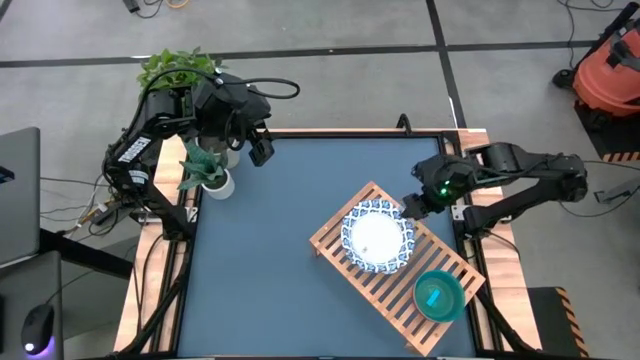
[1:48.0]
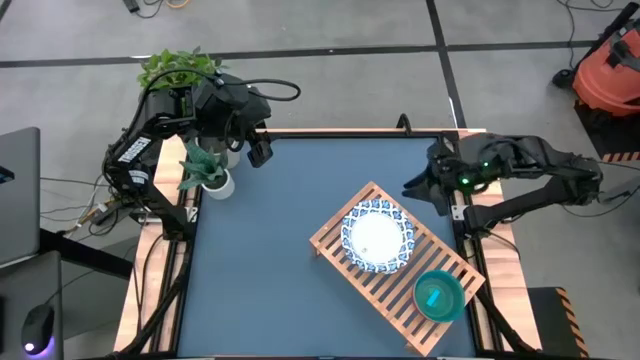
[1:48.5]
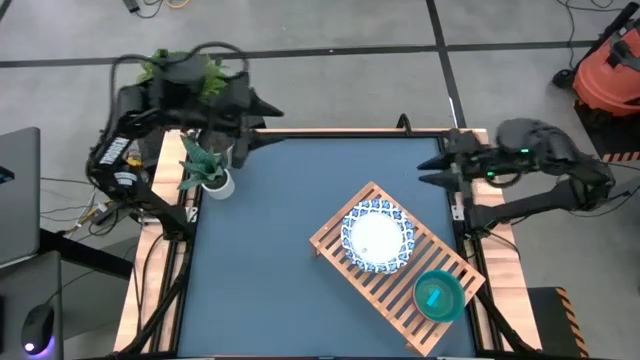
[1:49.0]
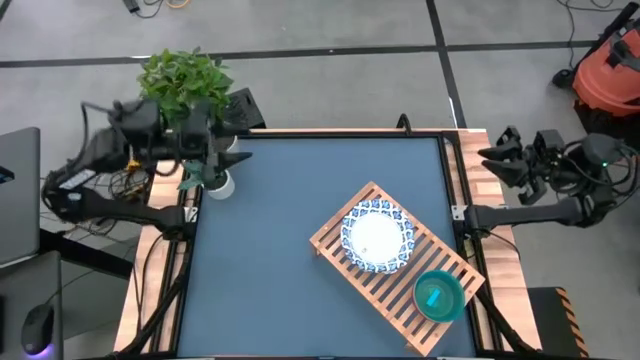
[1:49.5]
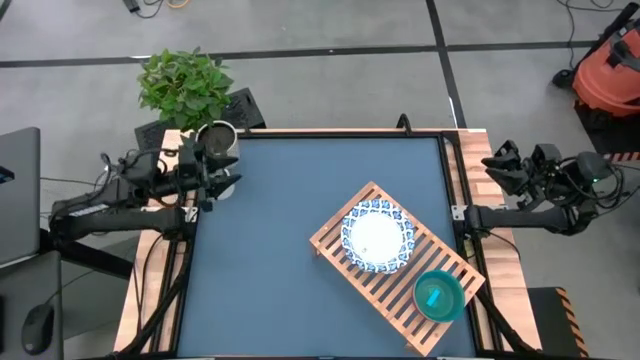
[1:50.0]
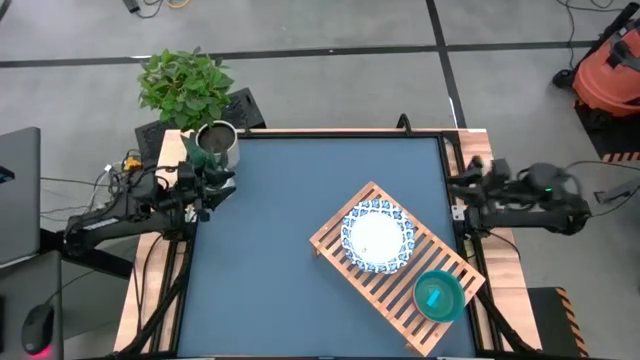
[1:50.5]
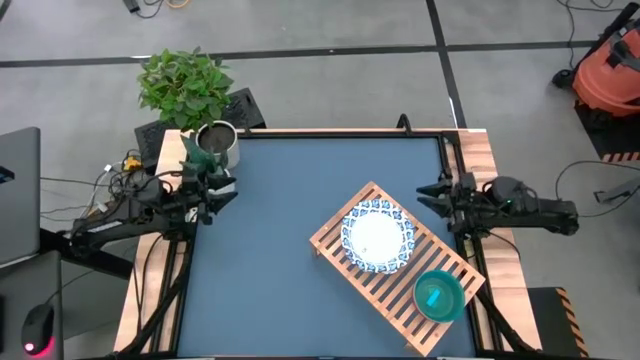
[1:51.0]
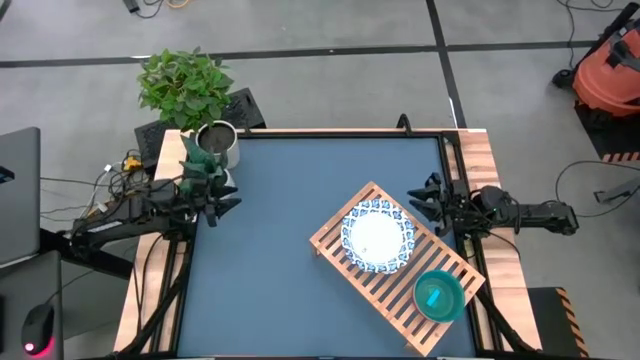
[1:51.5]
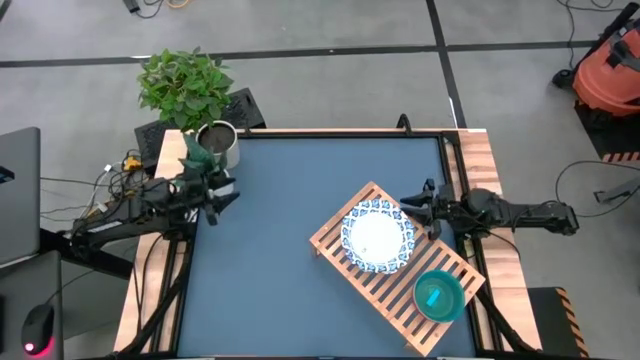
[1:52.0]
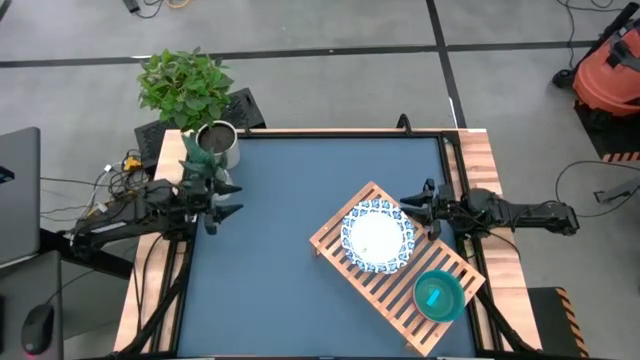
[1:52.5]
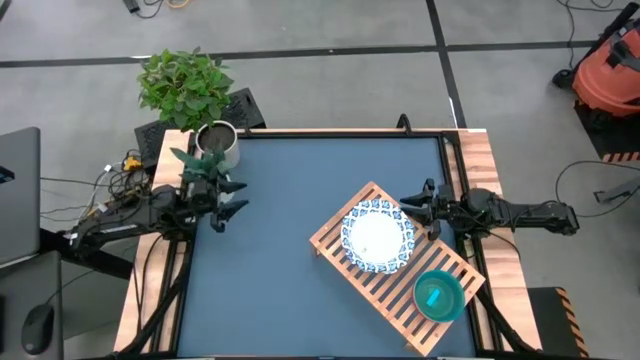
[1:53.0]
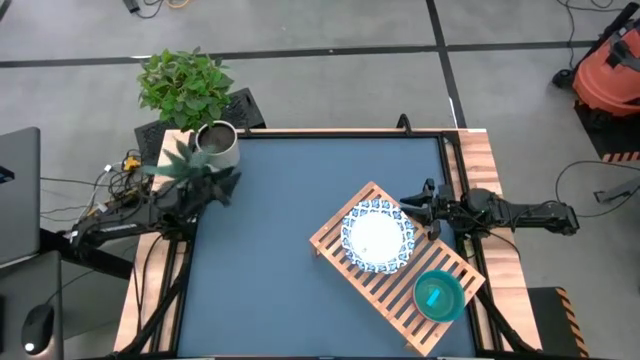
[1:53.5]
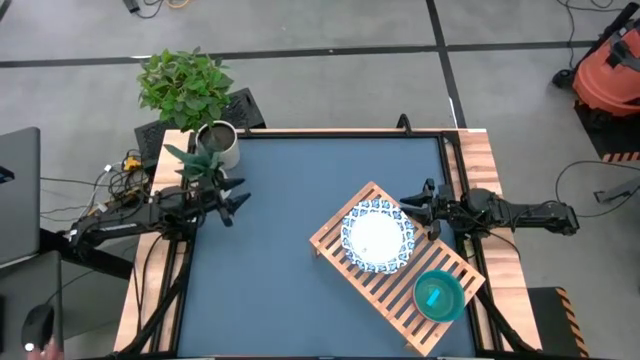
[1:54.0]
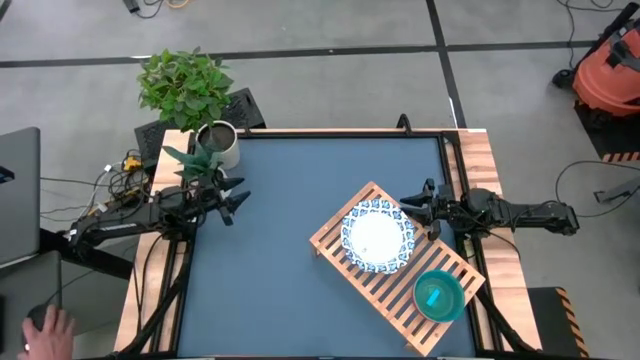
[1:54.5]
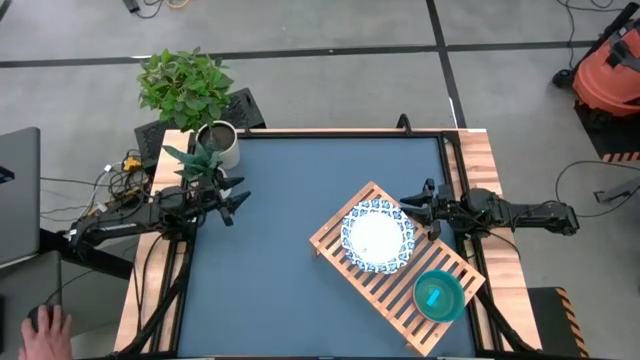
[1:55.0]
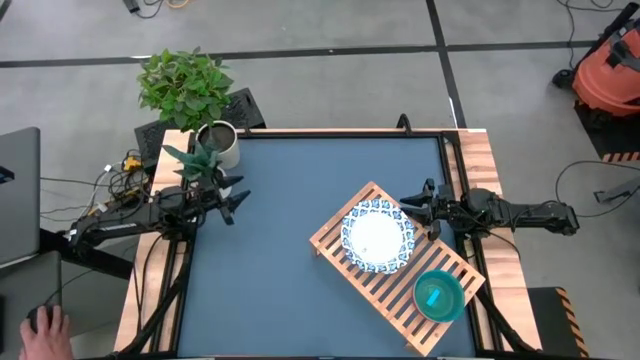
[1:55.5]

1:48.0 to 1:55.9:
Task: Place and stack bowls onto a shelf
Return to Home Position

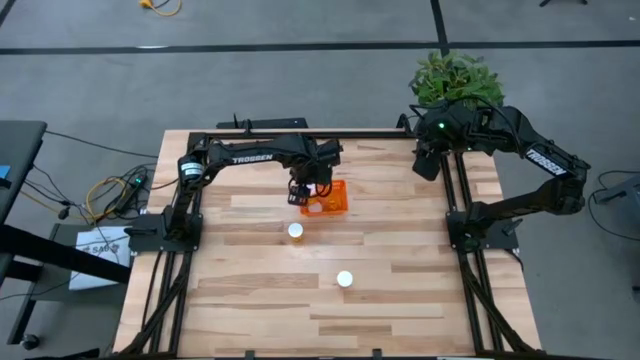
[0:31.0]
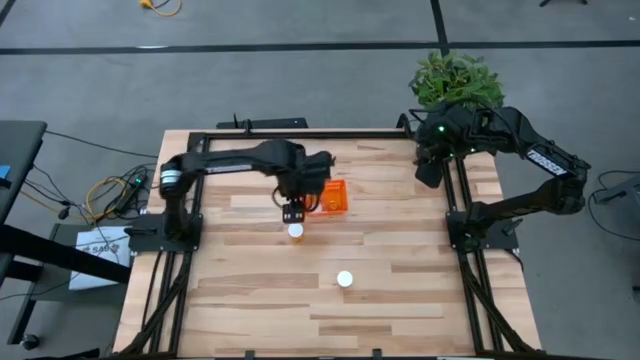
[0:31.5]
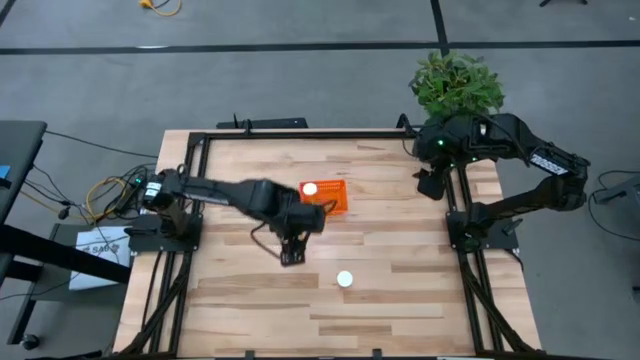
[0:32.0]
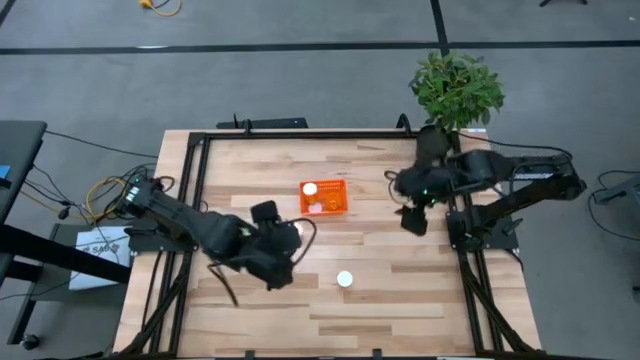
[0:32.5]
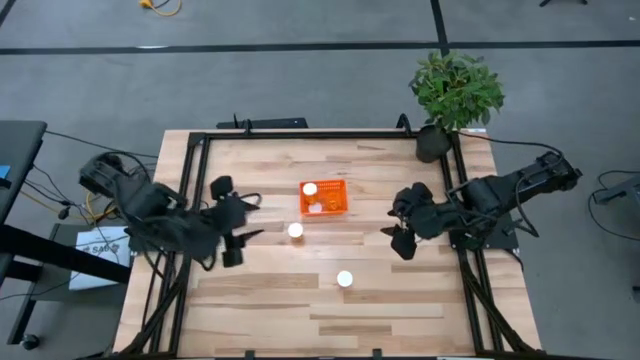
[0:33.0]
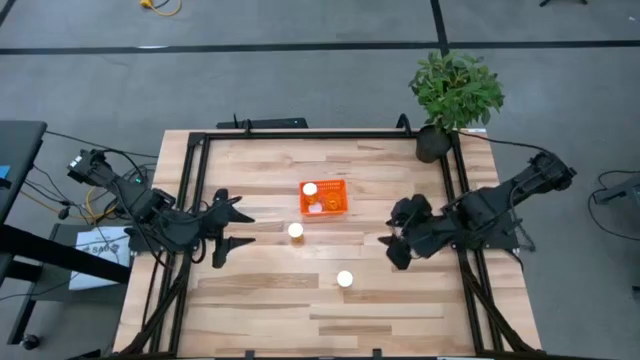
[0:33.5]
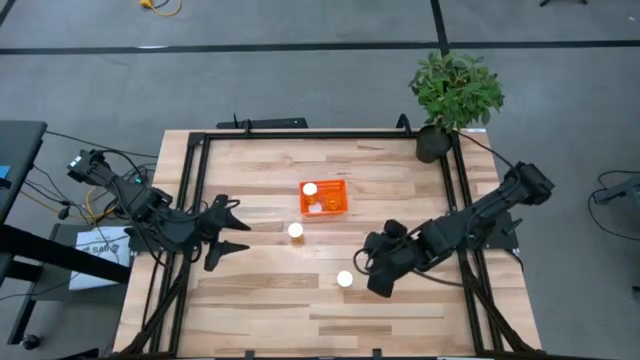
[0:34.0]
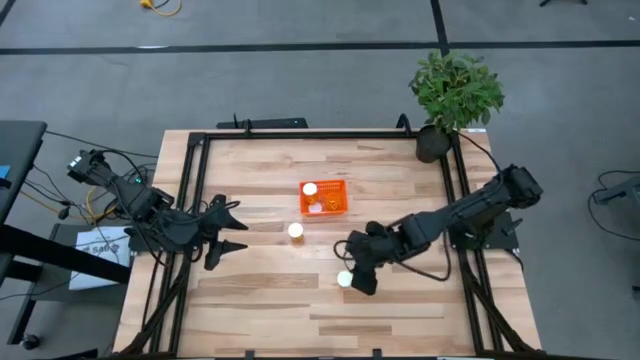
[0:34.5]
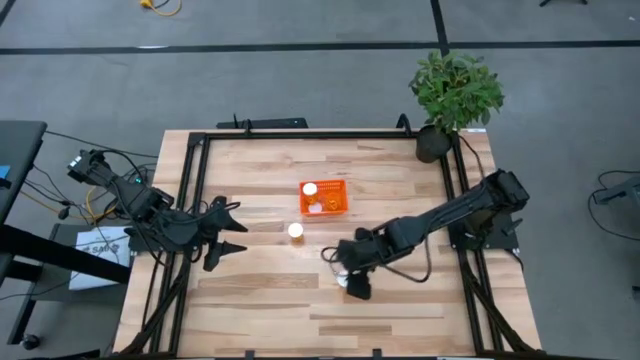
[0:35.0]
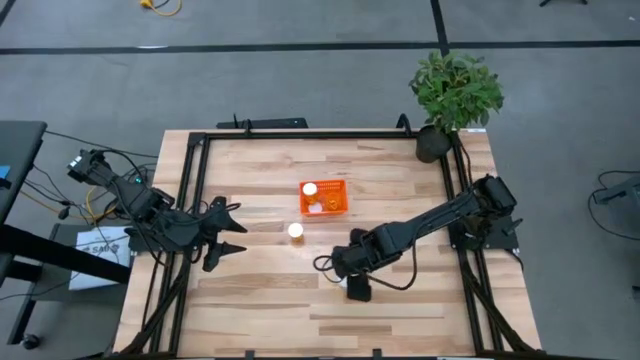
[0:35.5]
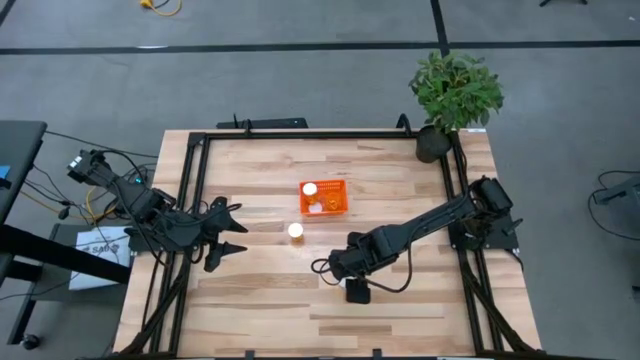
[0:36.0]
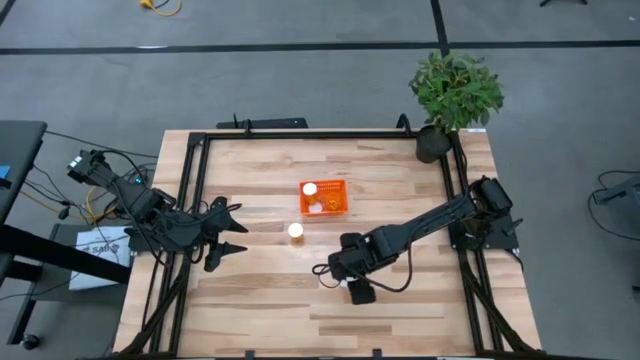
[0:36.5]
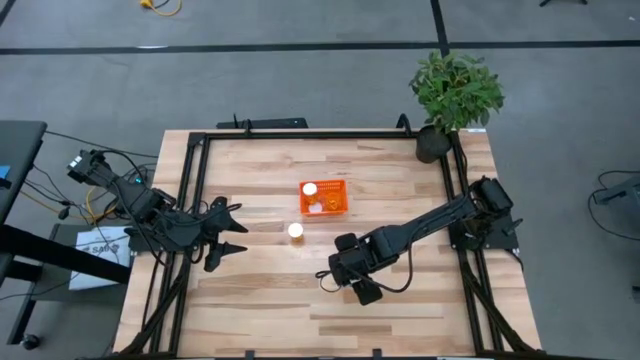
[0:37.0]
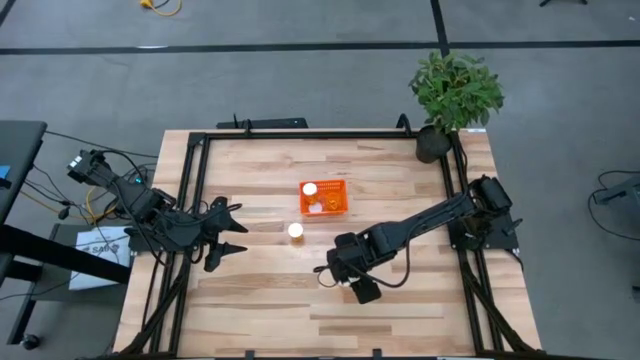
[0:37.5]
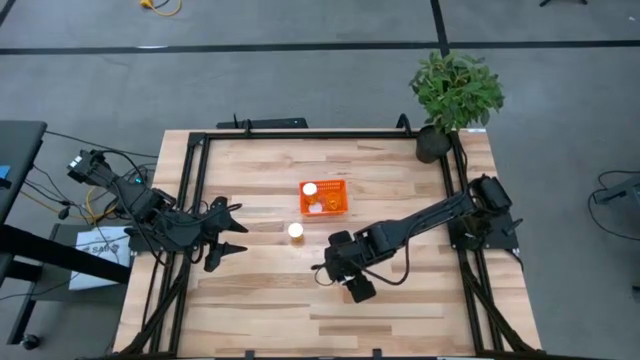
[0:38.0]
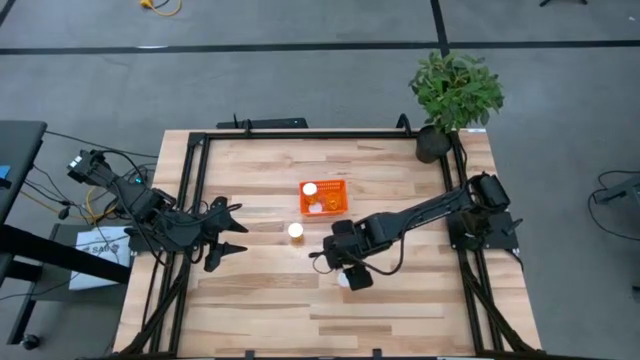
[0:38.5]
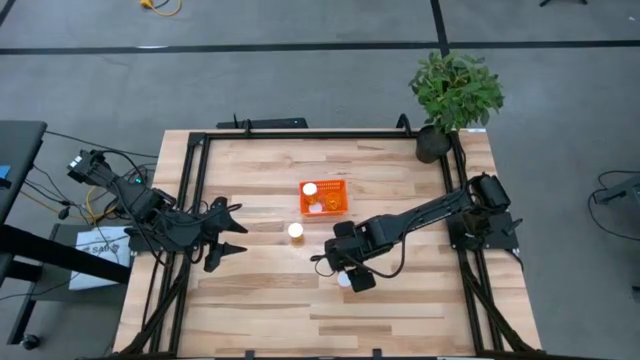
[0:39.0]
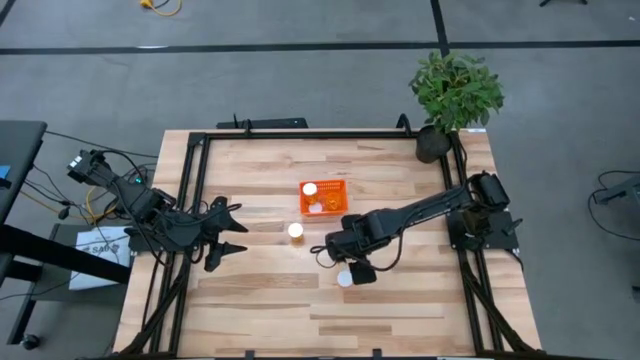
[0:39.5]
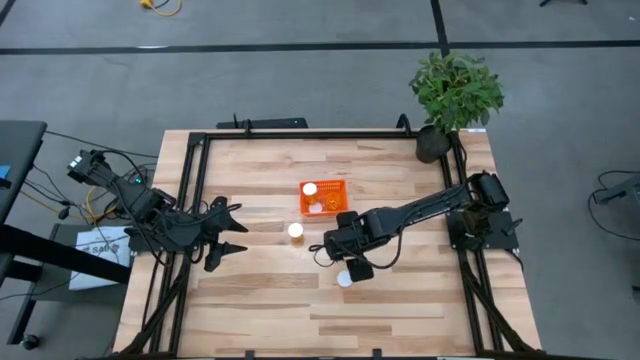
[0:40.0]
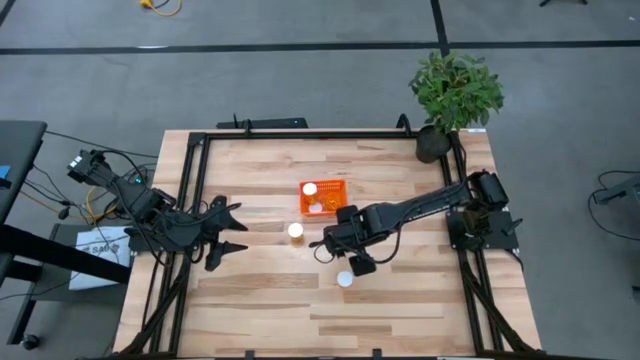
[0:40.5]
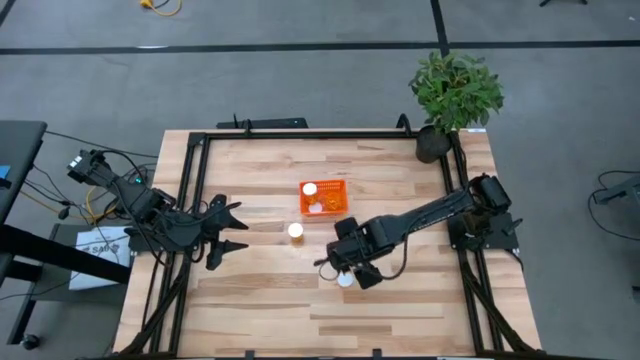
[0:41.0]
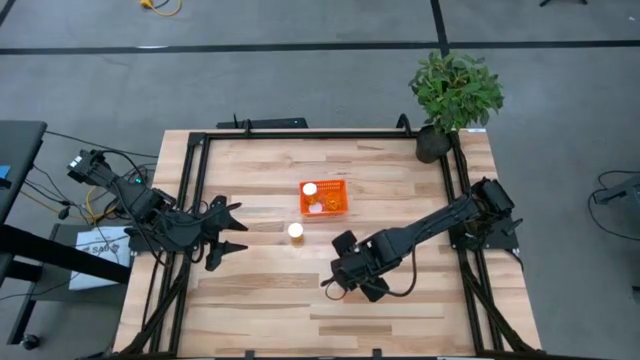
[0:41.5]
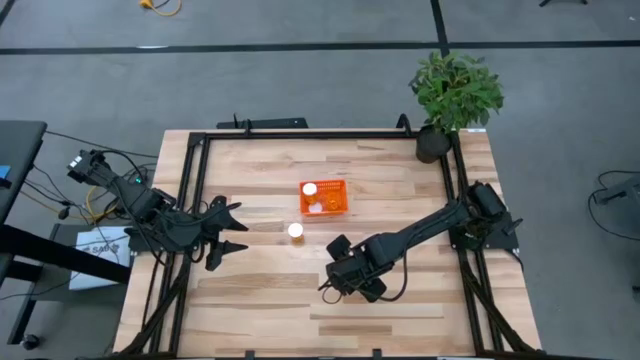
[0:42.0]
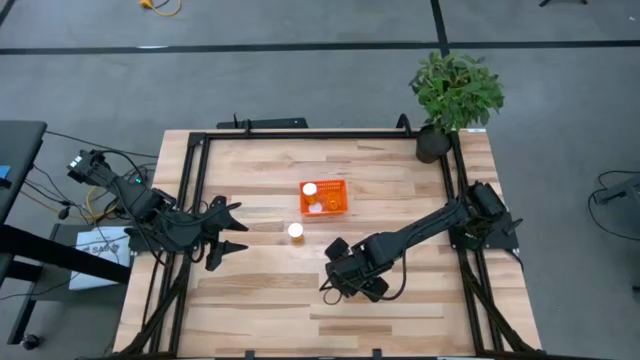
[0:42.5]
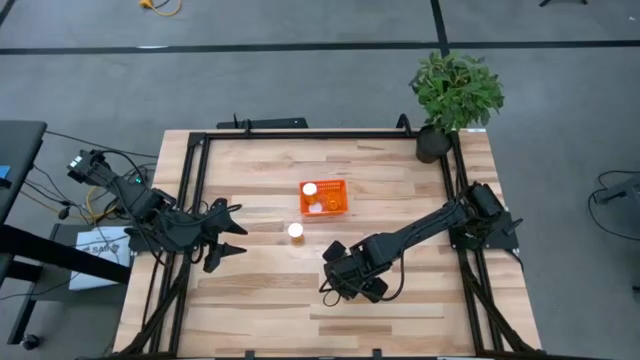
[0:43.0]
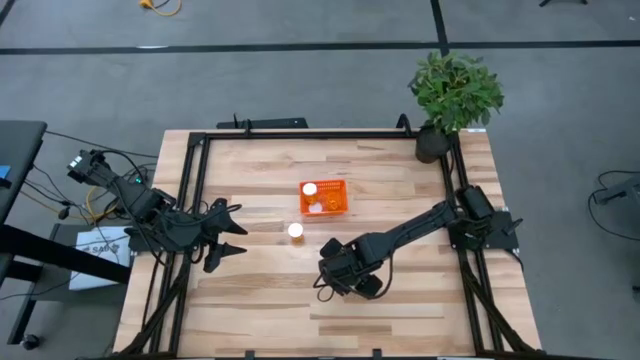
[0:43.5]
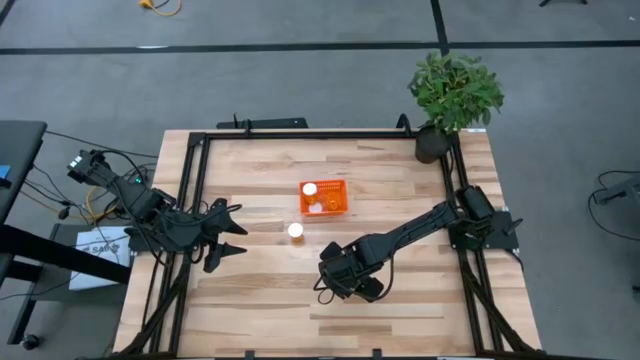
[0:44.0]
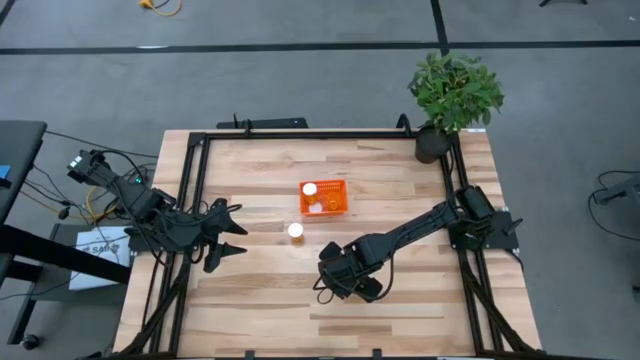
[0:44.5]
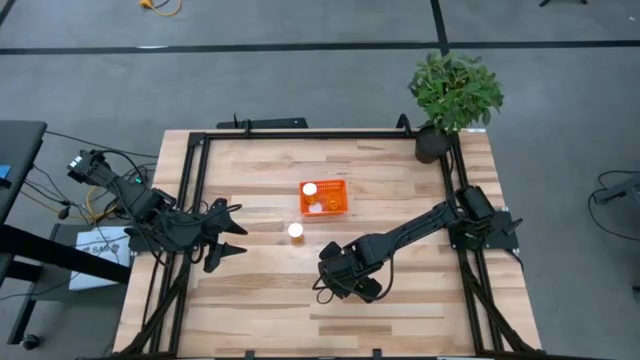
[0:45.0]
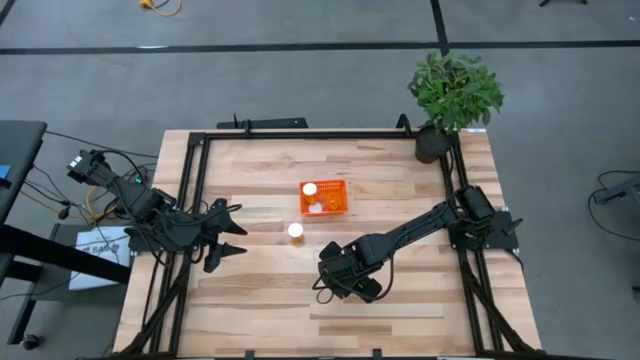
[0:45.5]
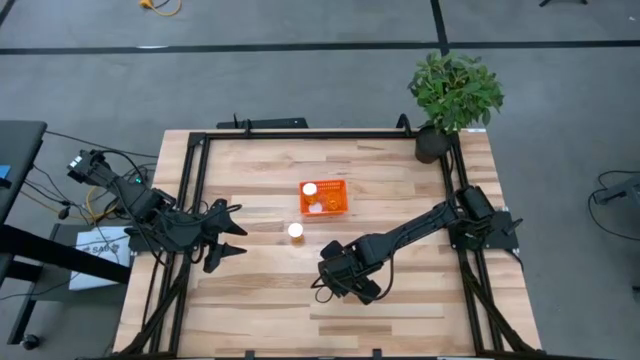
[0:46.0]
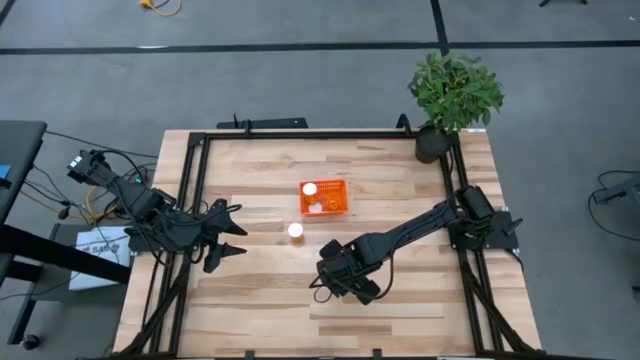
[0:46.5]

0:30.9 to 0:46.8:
Task: Pick and place pill bottles into a basket
Put the orange pill bottle into the orange bin
